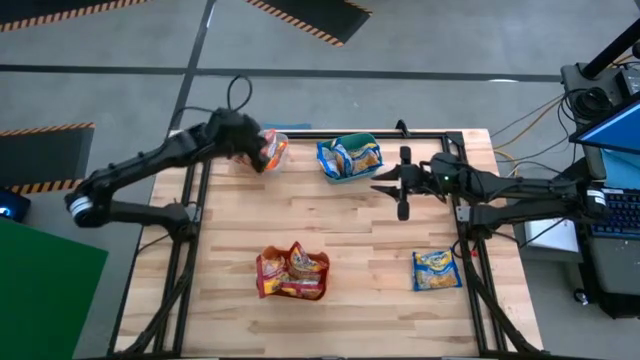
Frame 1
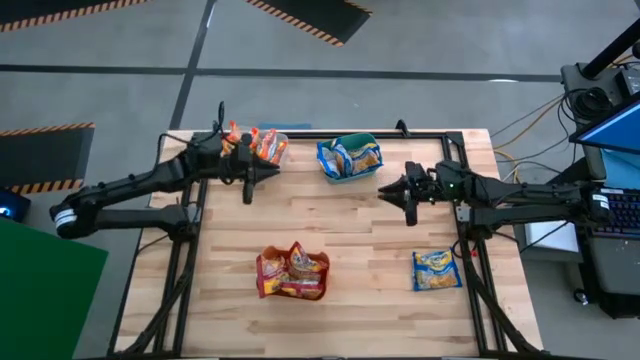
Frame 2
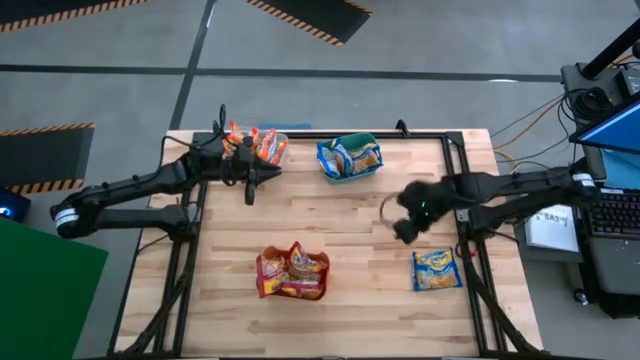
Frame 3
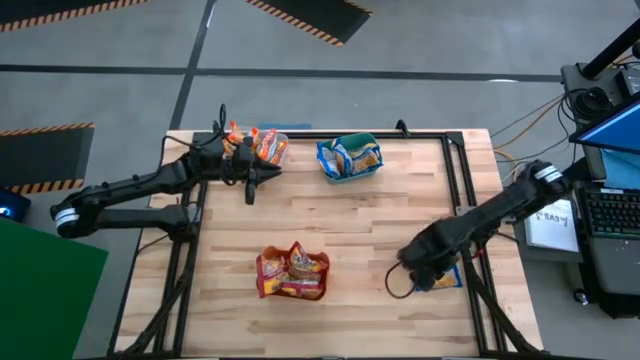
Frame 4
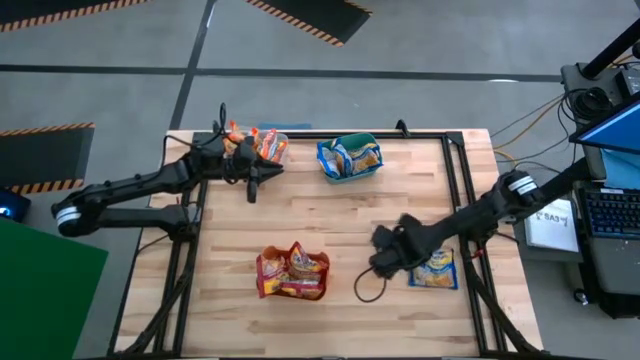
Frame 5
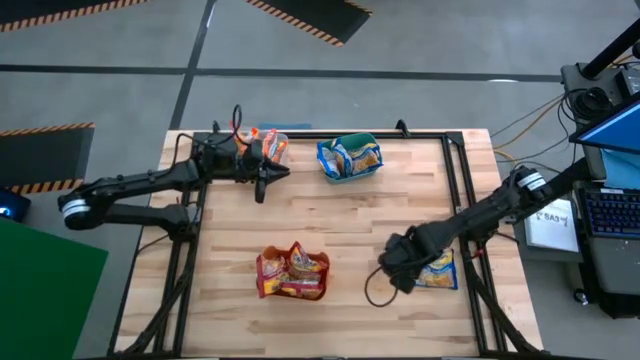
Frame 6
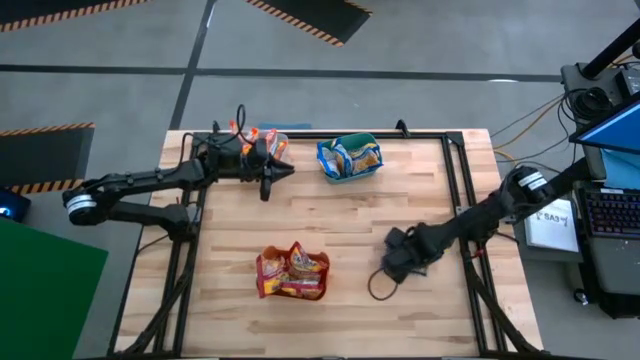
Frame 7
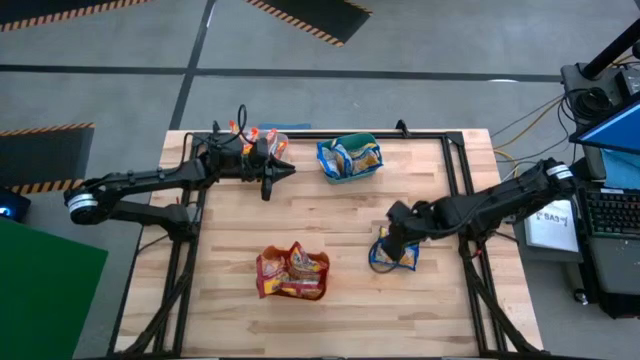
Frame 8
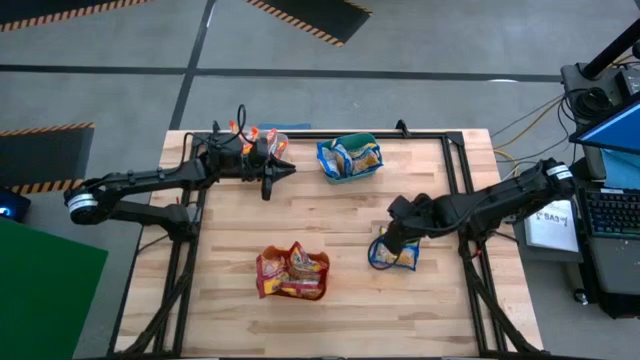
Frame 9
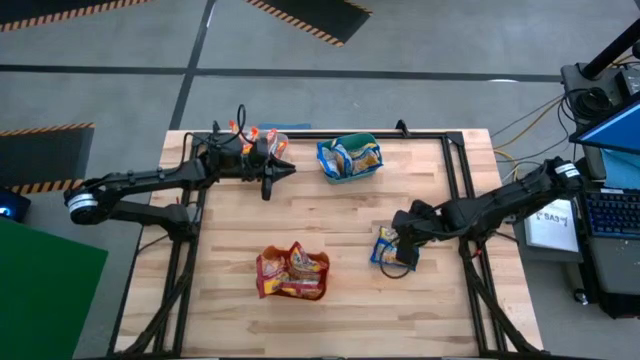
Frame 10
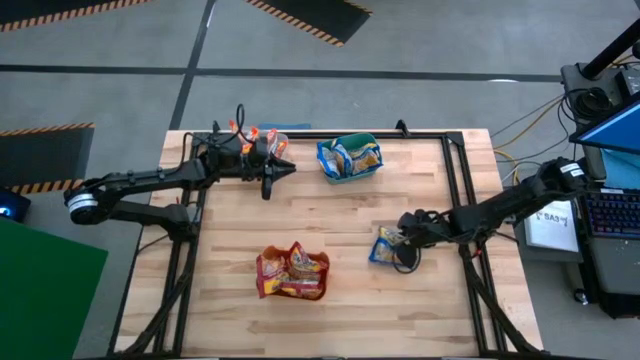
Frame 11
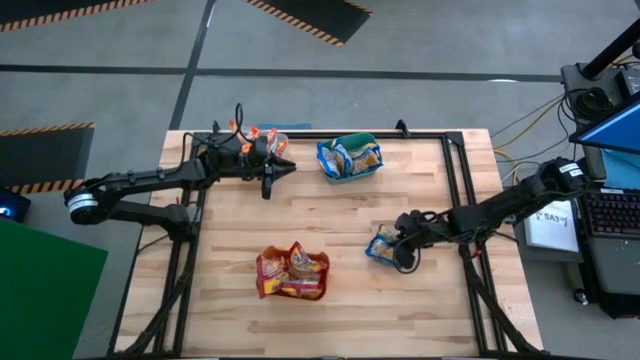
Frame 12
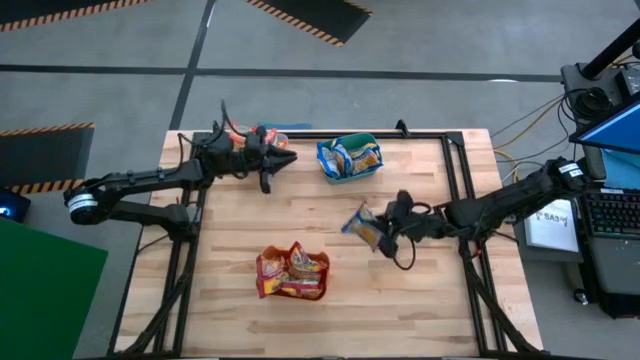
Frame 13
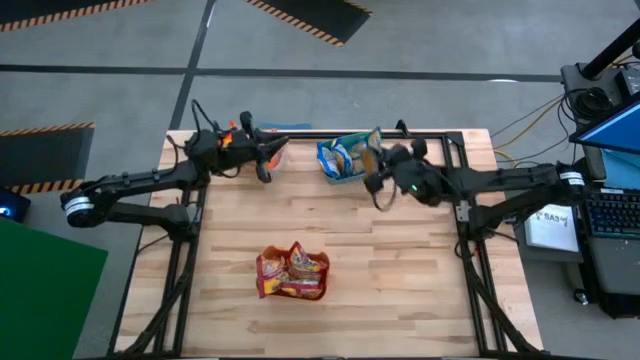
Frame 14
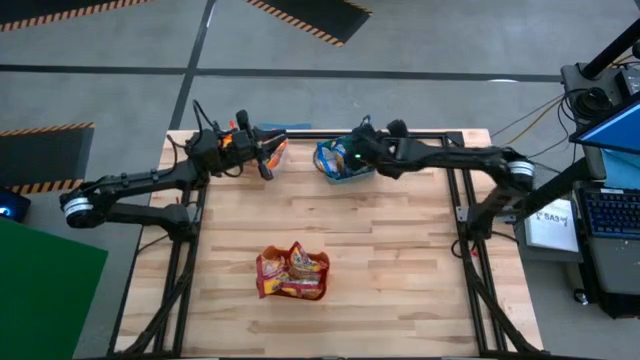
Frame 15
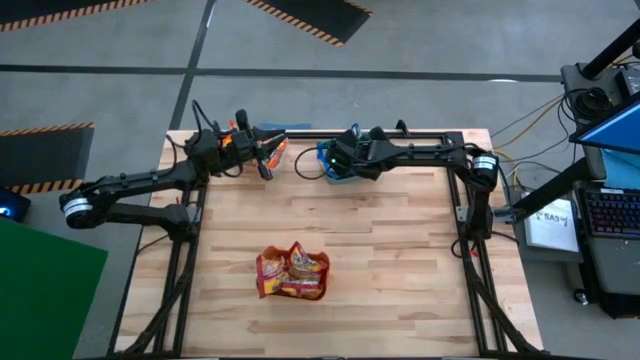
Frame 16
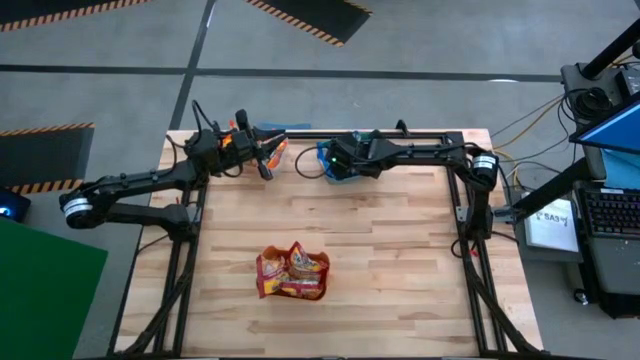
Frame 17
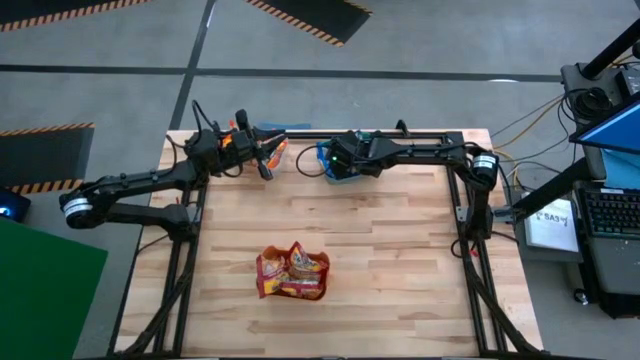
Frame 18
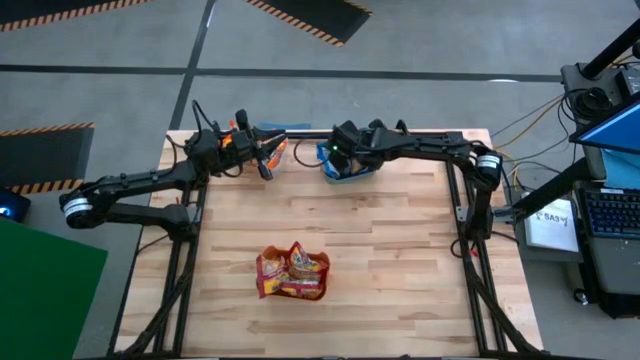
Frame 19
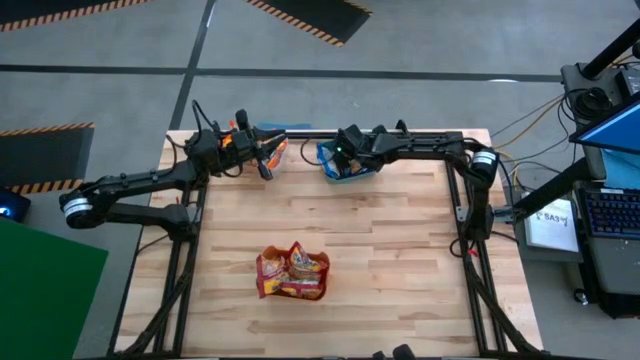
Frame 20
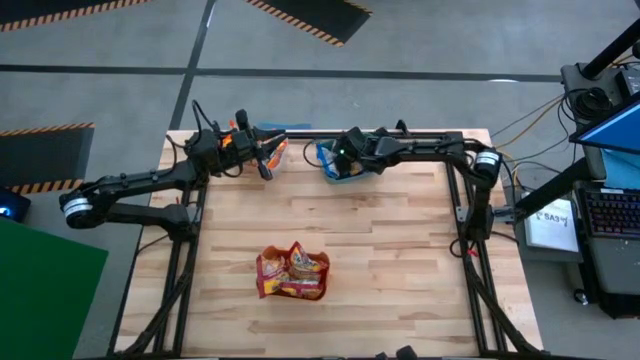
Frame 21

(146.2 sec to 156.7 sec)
Task: Sort Maruchan noodles
Put the blue noodle pack into the green bin

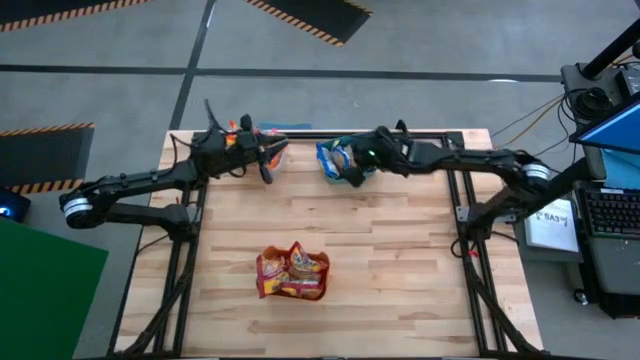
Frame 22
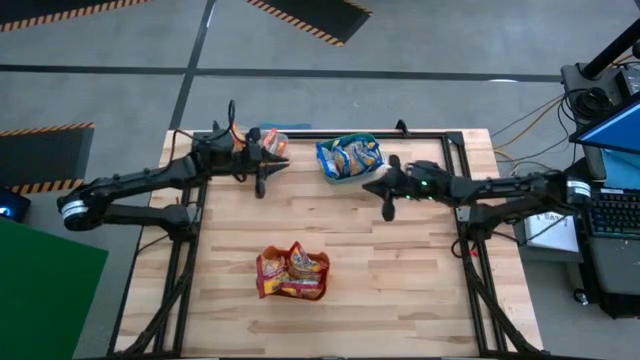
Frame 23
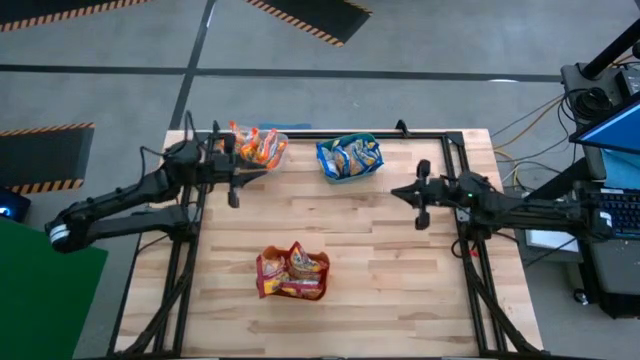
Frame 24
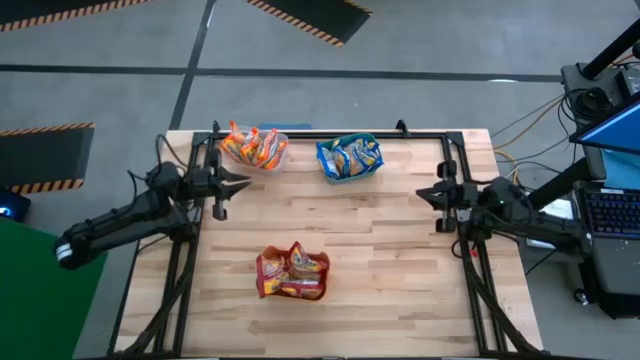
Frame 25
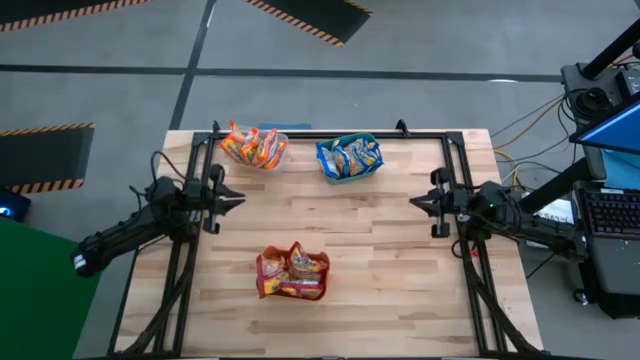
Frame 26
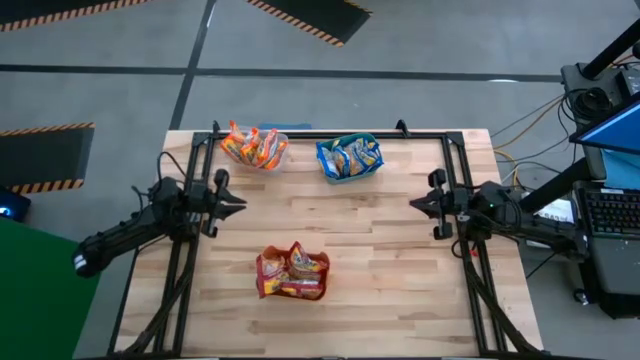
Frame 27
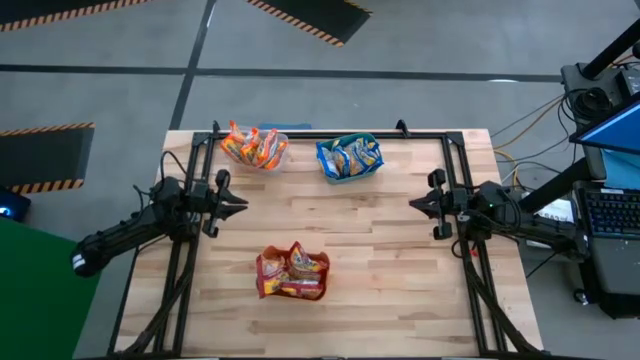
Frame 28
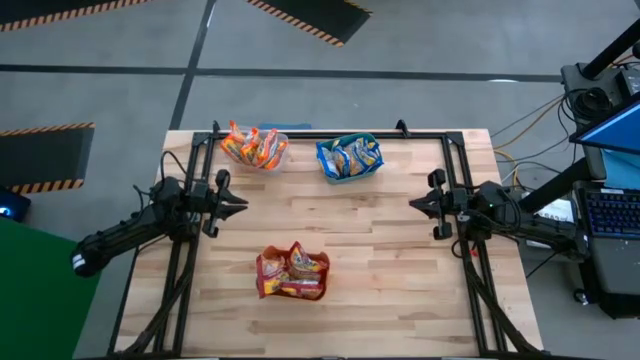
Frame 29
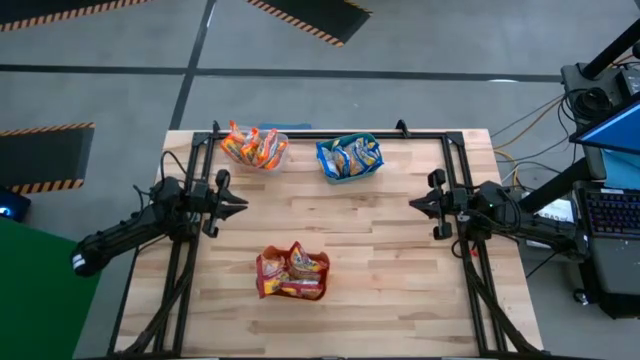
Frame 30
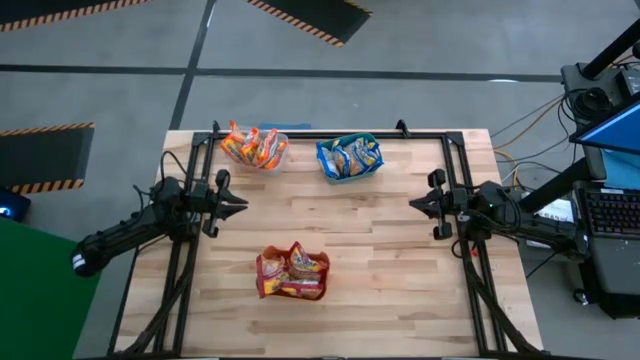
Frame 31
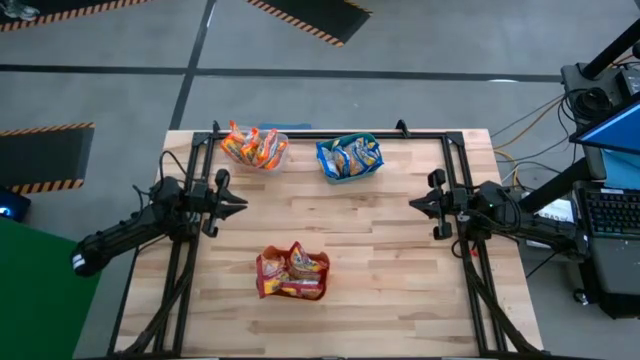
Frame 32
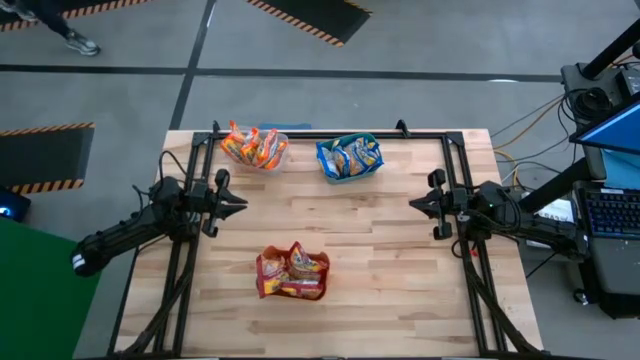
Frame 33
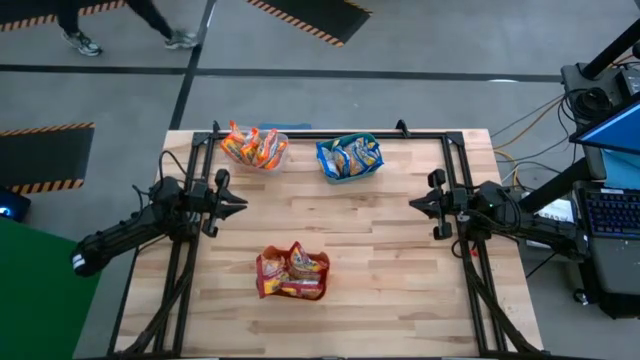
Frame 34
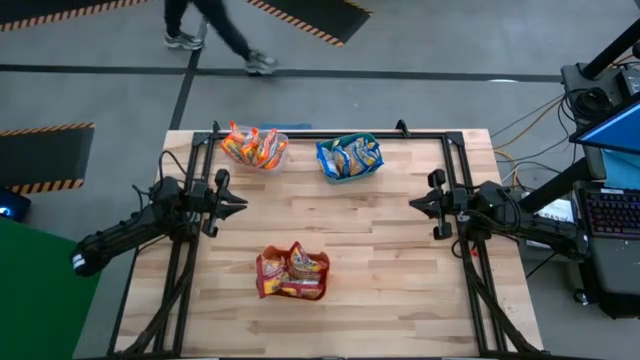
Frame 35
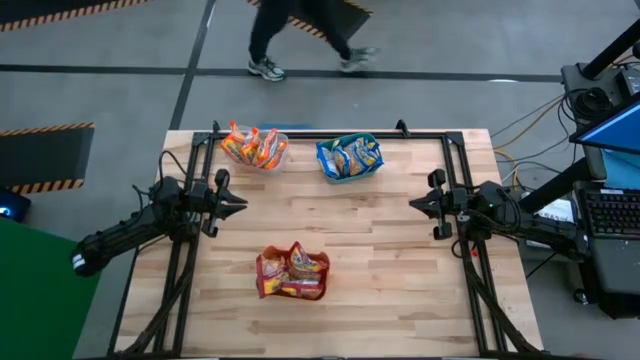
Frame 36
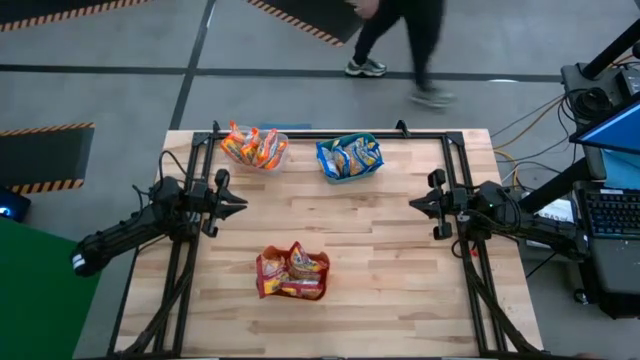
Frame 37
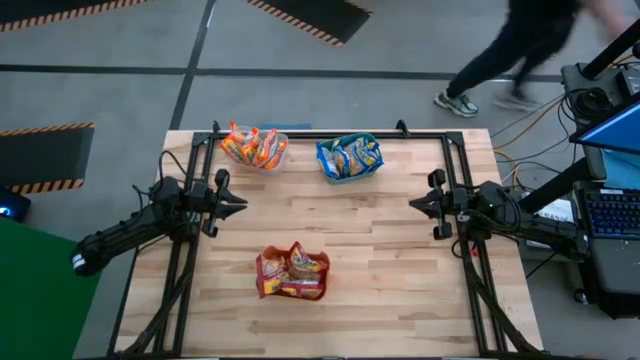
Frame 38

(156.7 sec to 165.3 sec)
Return to Home Position
